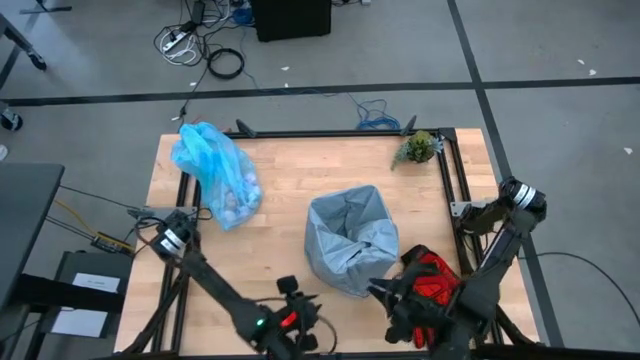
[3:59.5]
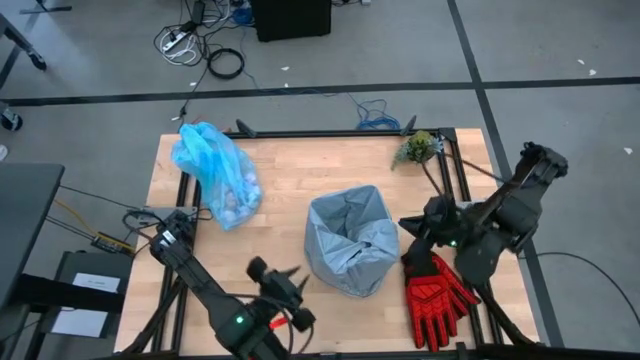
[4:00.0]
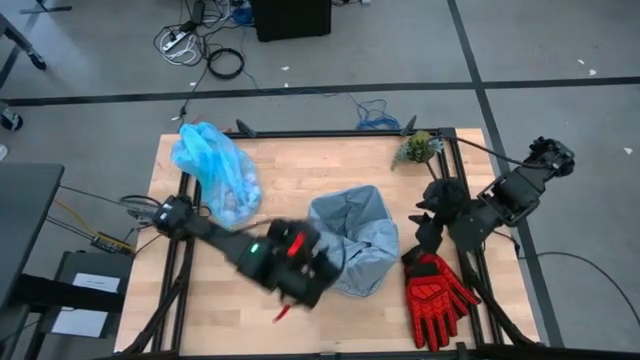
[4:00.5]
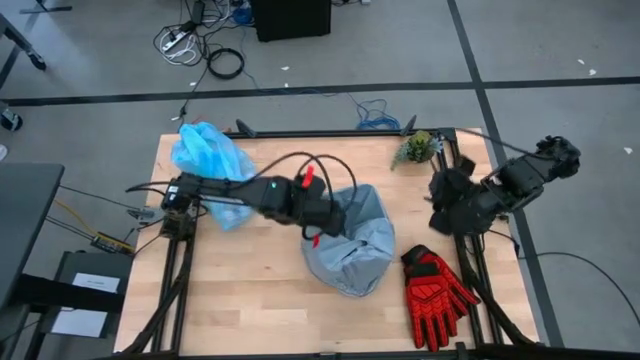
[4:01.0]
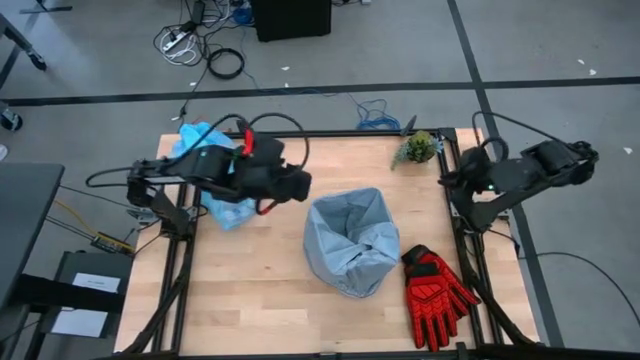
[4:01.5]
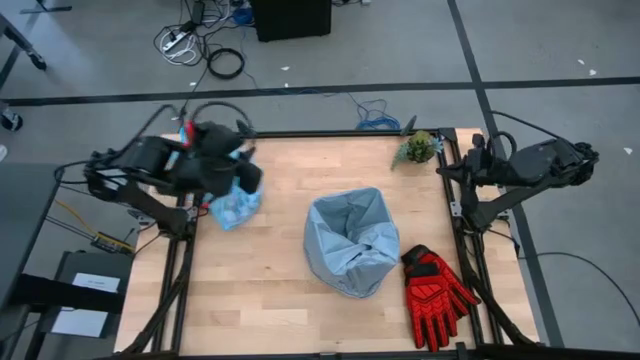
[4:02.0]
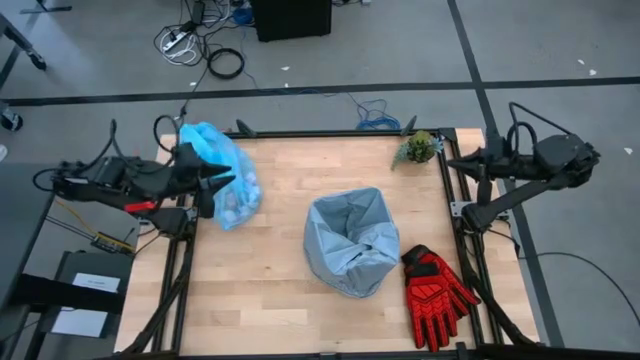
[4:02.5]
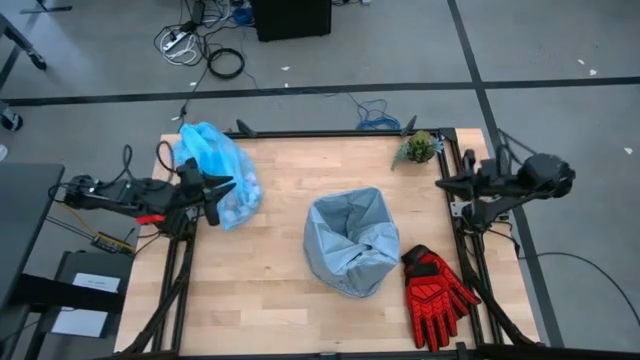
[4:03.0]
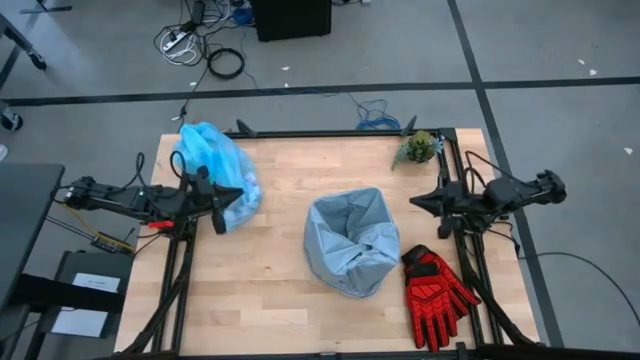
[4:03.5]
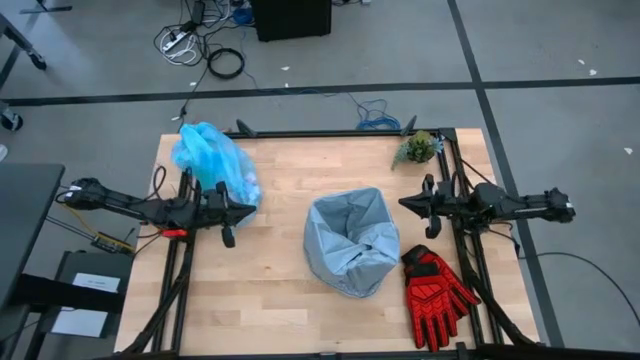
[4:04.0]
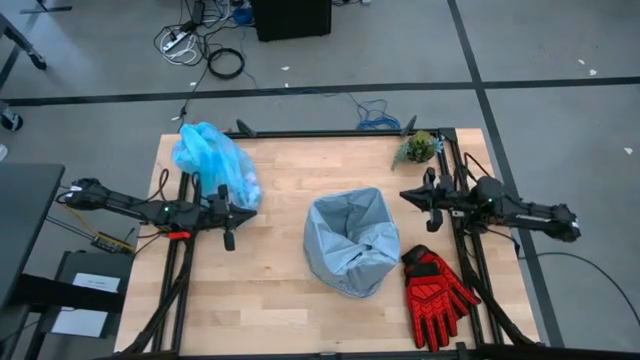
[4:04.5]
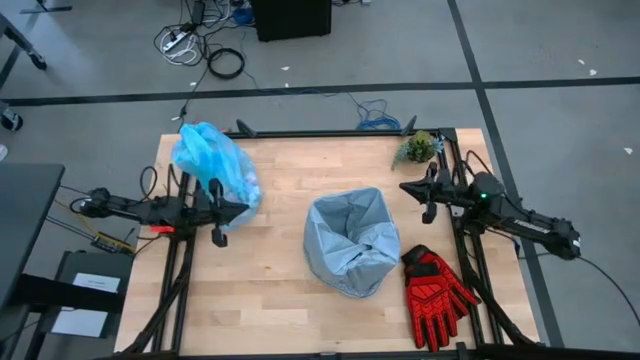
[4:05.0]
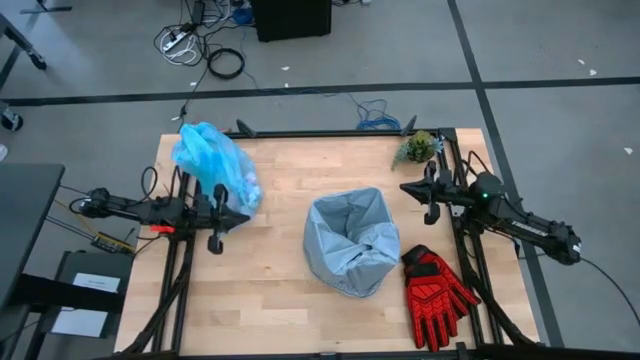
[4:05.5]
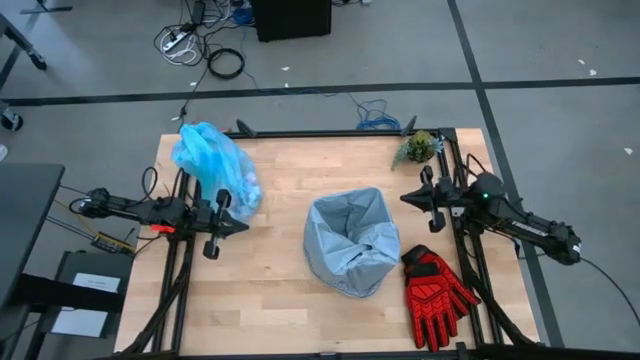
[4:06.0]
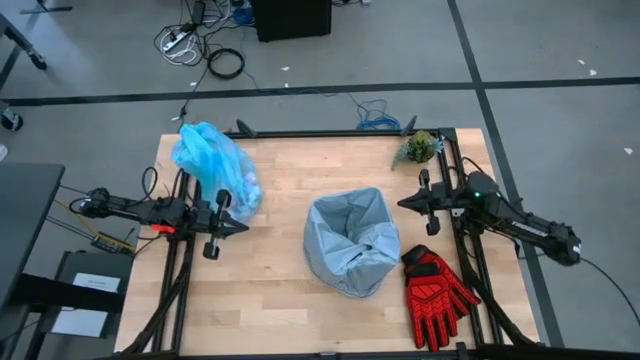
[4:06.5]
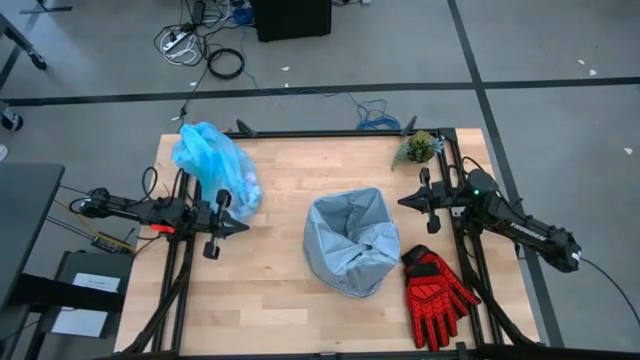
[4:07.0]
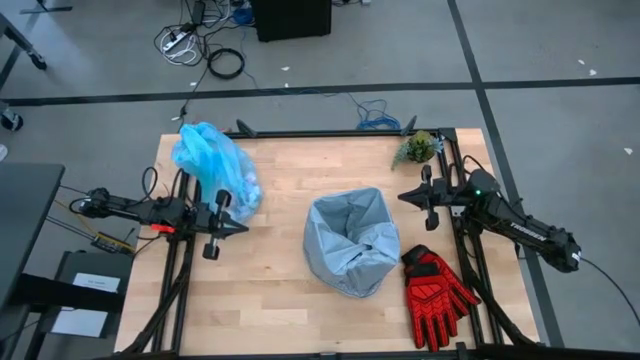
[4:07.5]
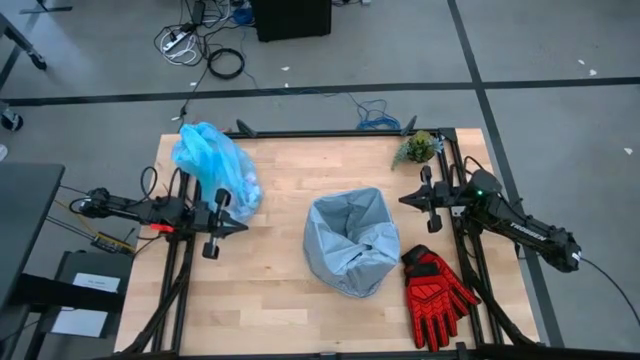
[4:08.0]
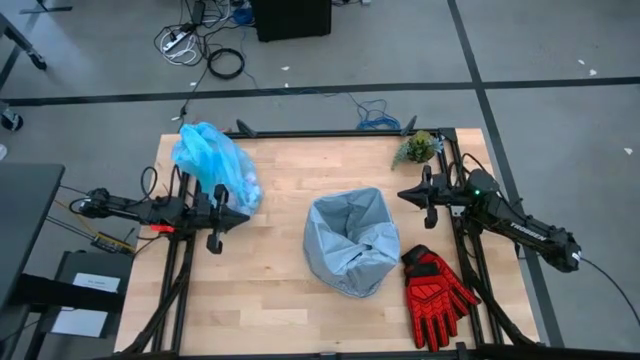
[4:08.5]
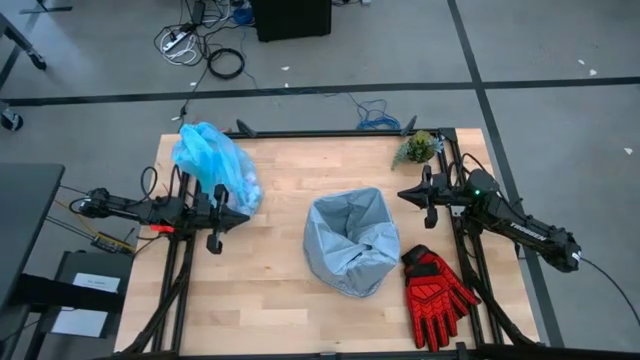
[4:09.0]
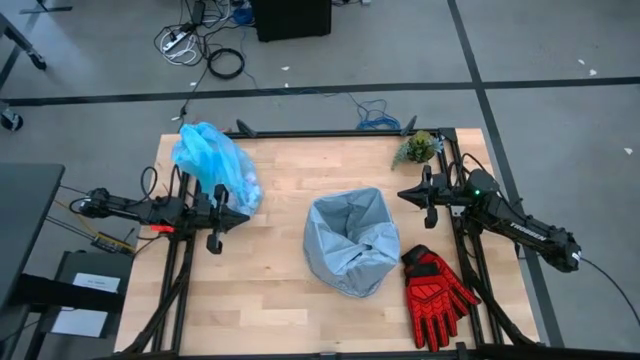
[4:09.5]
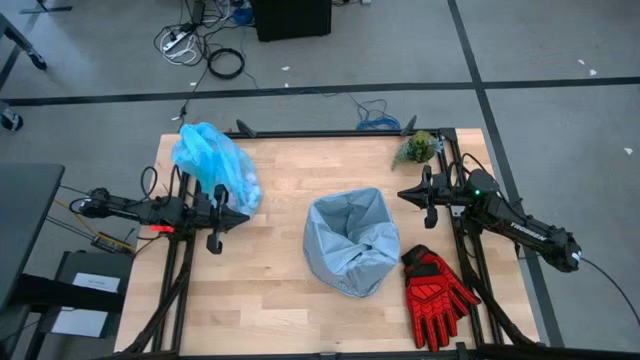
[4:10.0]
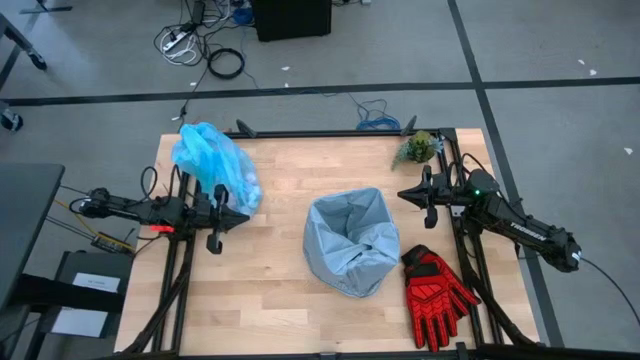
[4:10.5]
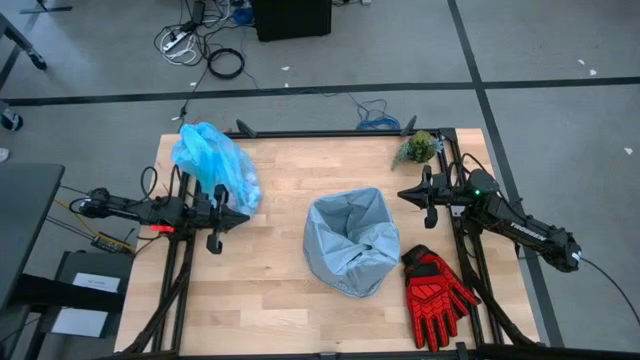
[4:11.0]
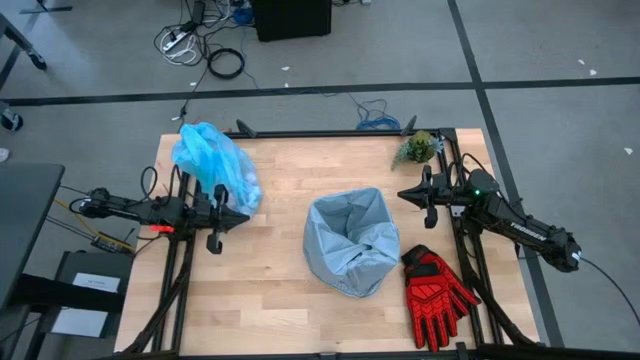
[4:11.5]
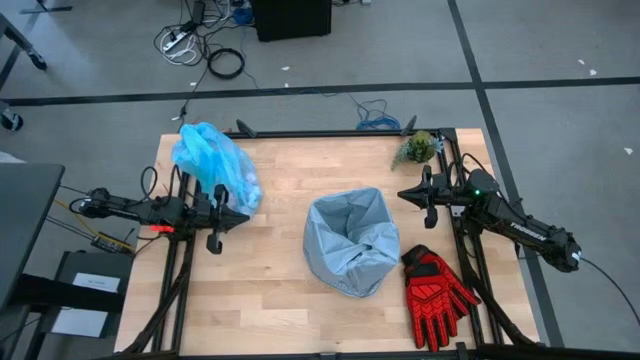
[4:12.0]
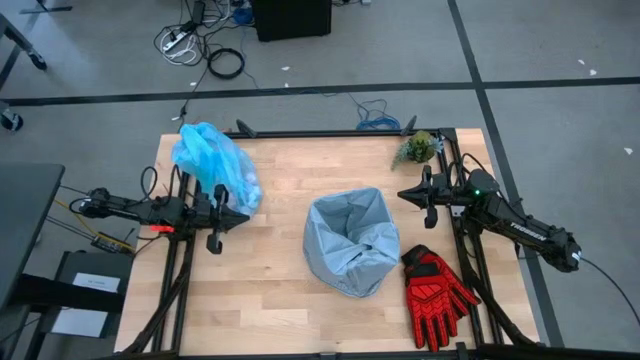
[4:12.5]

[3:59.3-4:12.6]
Task: place trash/remove bag and relplace
Return to Home Position

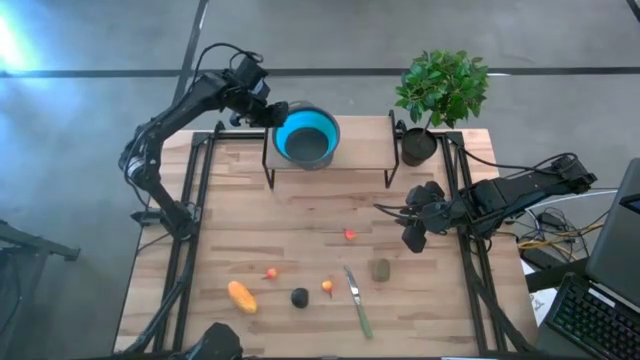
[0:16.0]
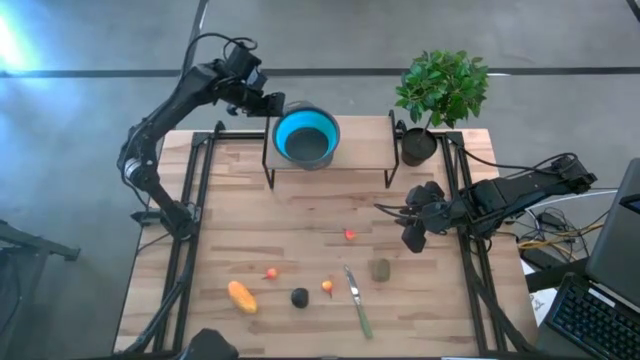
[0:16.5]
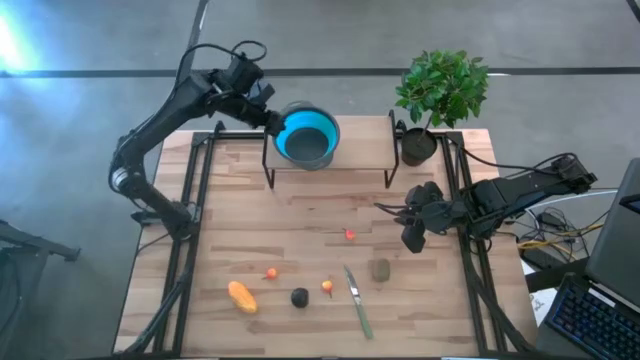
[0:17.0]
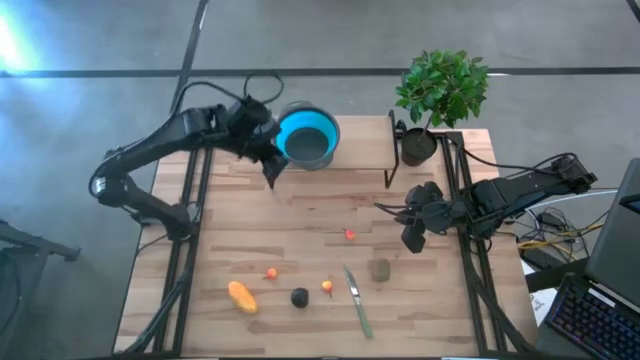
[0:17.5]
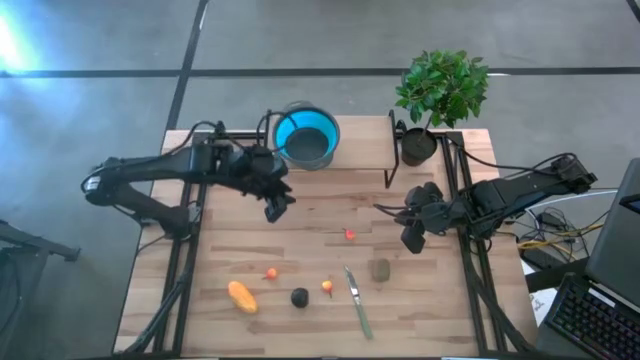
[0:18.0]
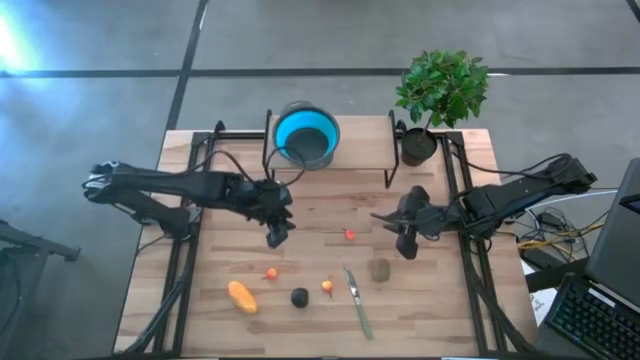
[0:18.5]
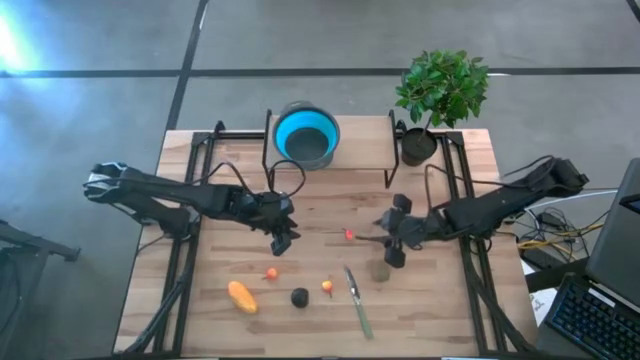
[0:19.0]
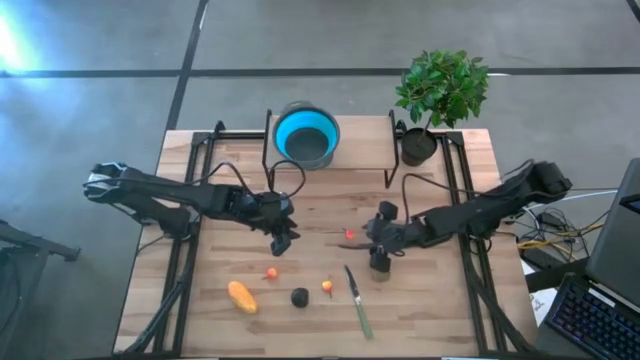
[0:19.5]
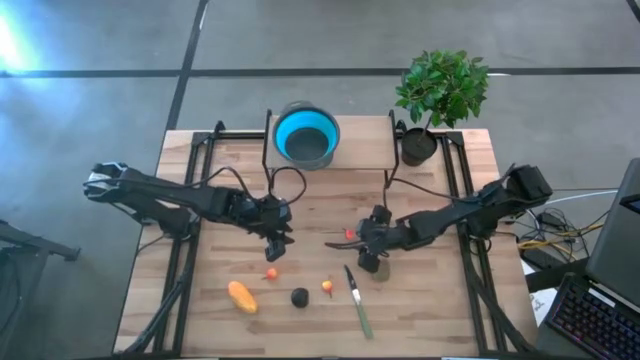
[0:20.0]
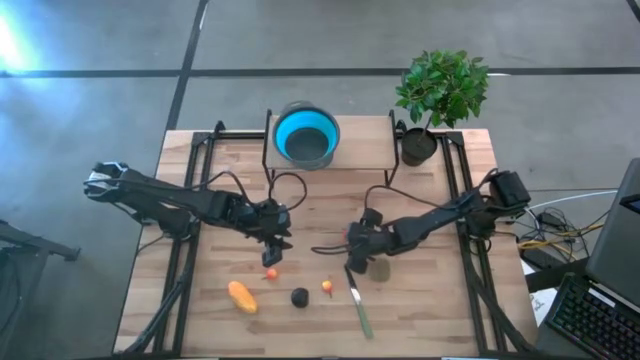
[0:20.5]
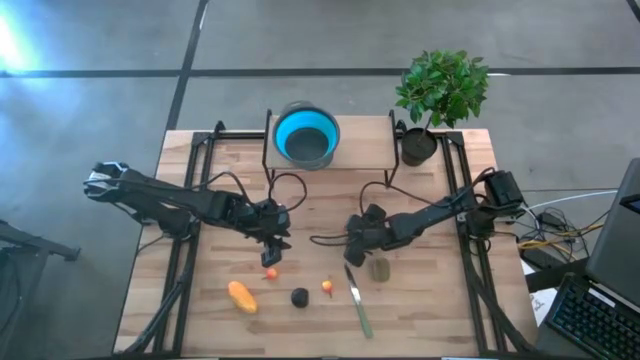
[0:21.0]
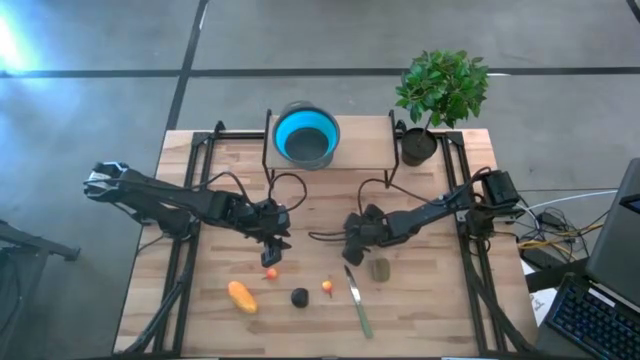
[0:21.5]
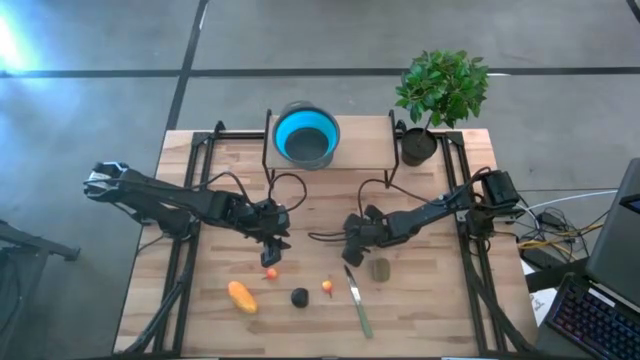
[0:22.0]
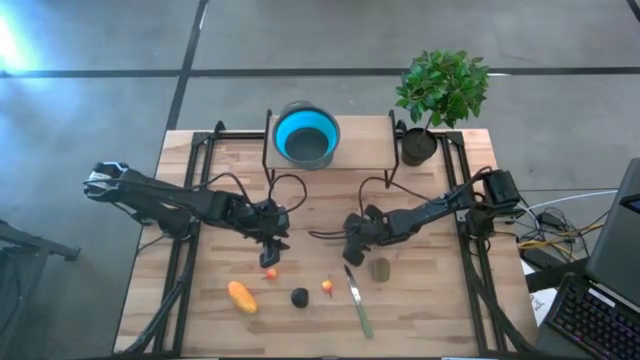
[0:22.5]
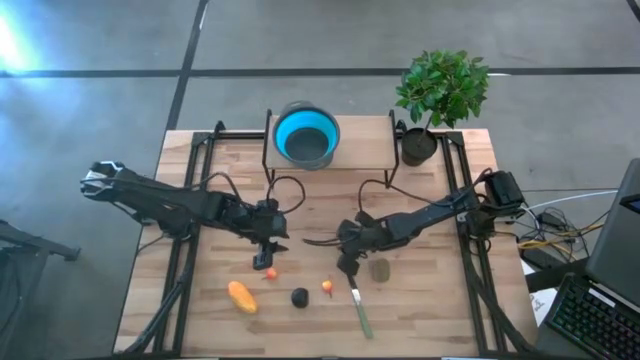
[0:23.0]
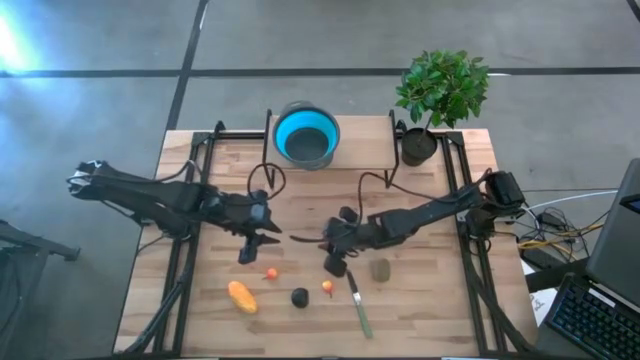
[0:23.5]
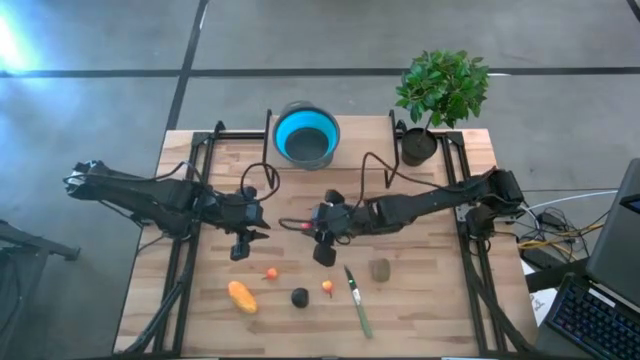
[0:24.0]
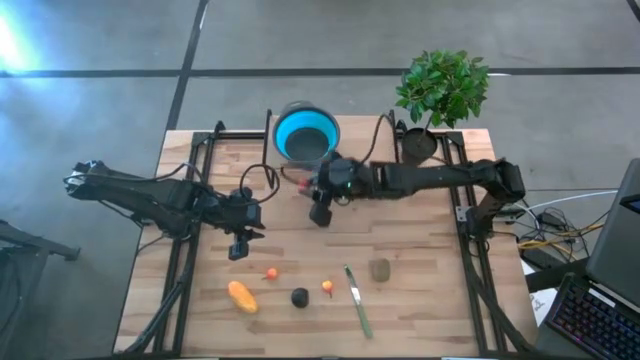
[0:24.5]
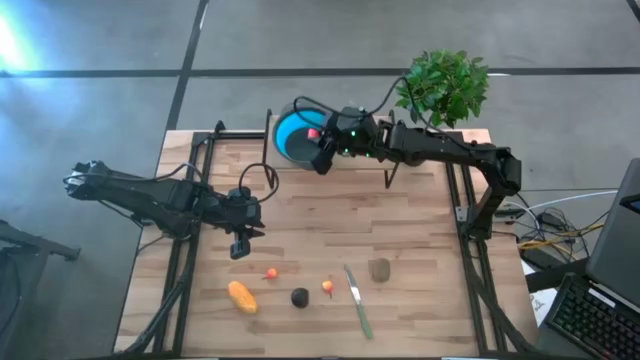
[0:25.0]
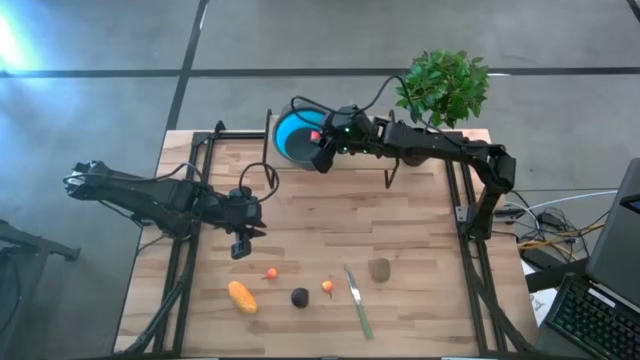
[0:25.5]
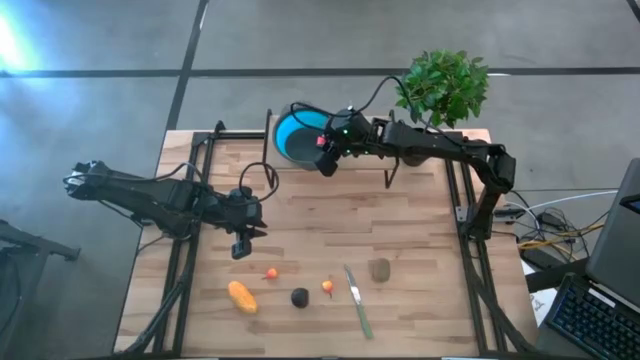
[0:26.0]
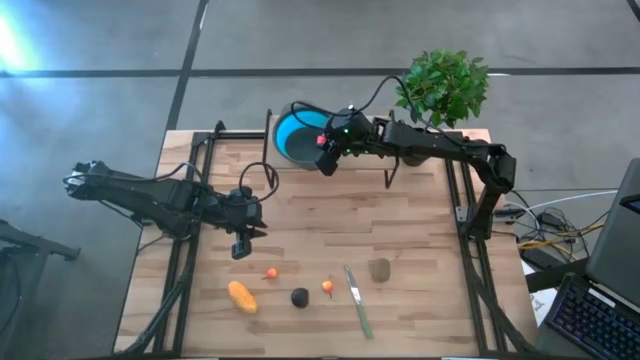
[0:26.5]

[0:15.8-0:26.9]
Task: Pick & Place Fruit
Put the top orange pear into the blue strainer bowl
